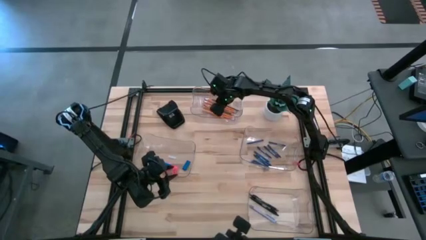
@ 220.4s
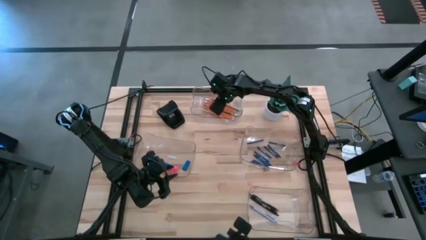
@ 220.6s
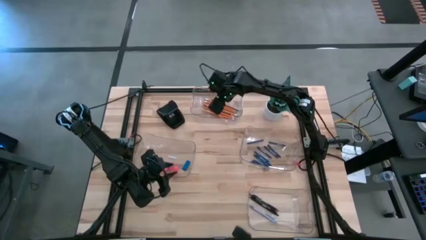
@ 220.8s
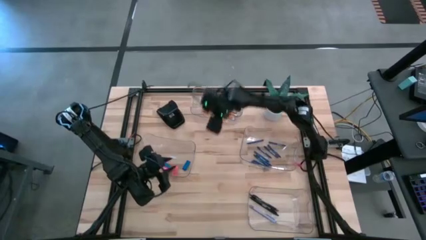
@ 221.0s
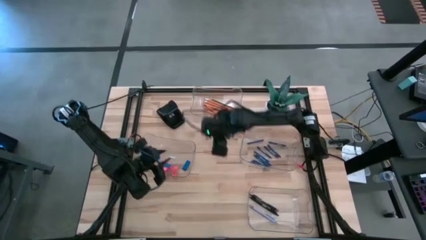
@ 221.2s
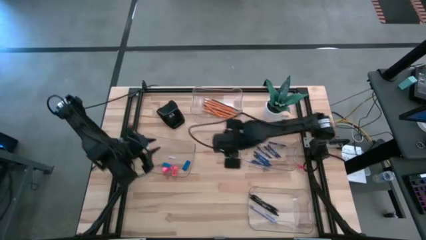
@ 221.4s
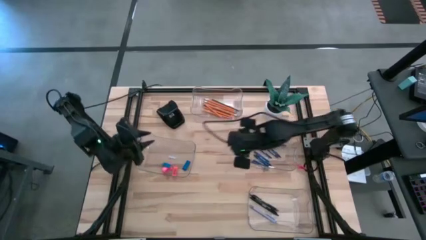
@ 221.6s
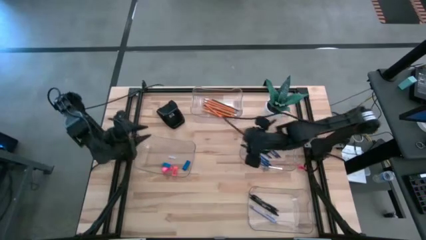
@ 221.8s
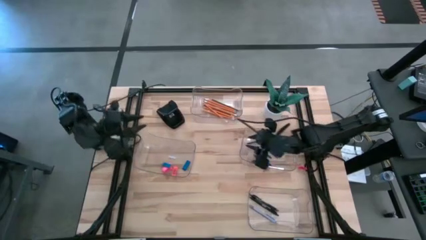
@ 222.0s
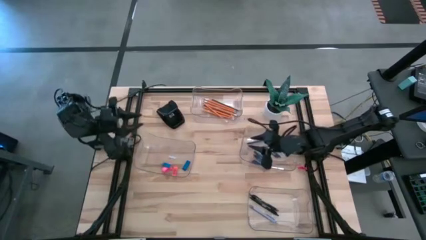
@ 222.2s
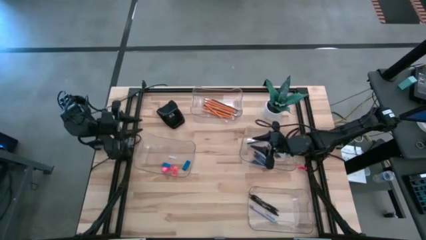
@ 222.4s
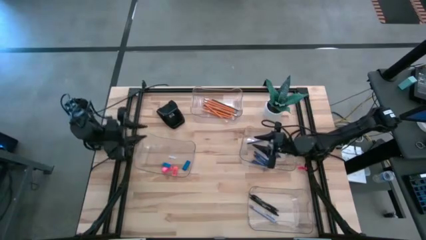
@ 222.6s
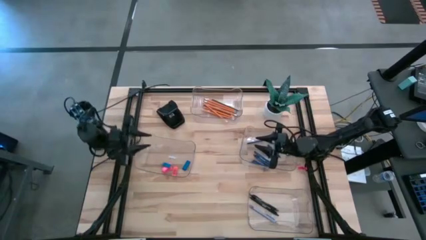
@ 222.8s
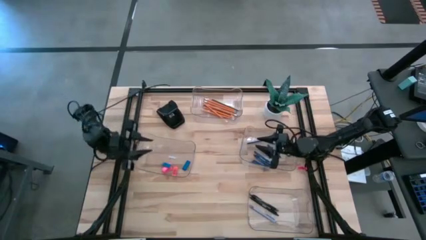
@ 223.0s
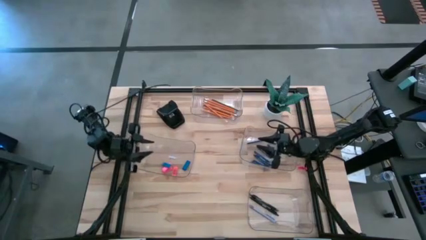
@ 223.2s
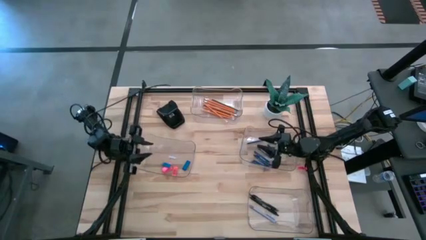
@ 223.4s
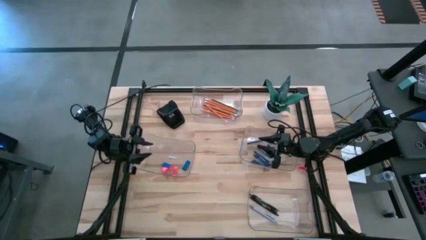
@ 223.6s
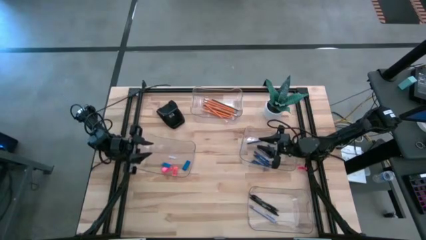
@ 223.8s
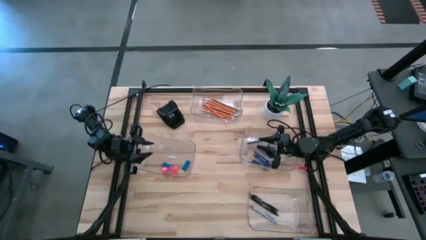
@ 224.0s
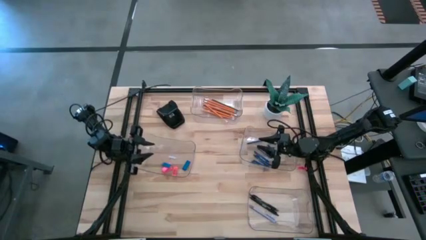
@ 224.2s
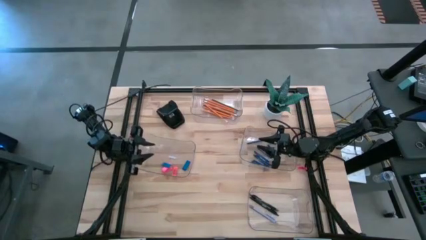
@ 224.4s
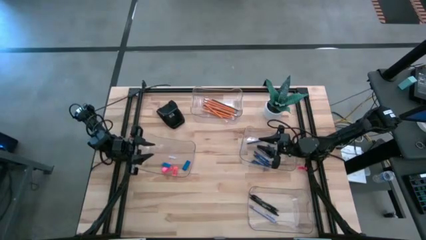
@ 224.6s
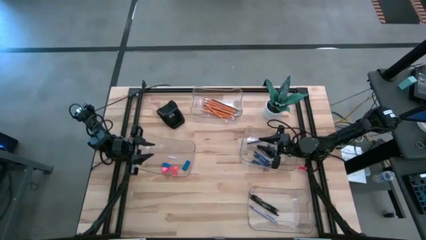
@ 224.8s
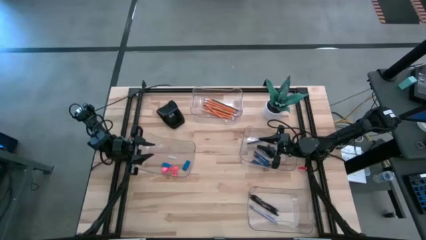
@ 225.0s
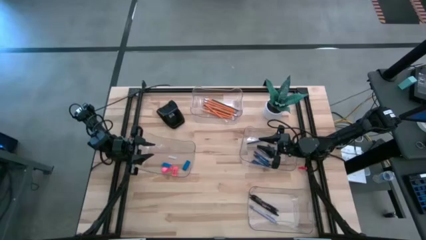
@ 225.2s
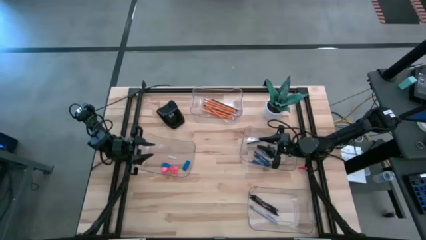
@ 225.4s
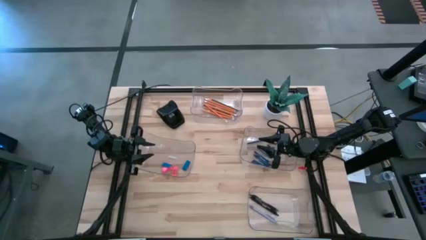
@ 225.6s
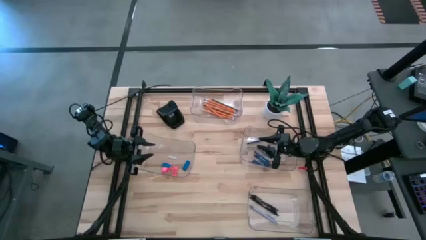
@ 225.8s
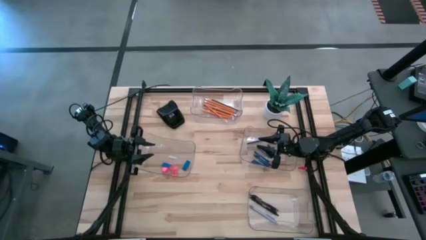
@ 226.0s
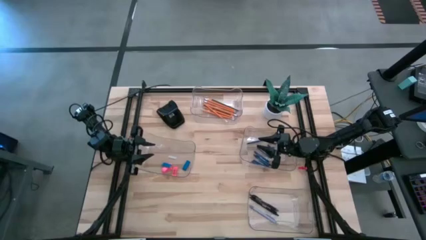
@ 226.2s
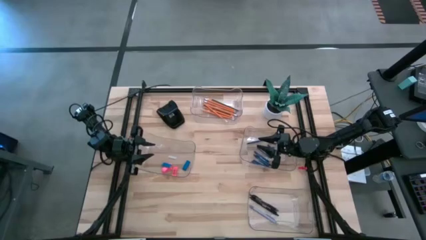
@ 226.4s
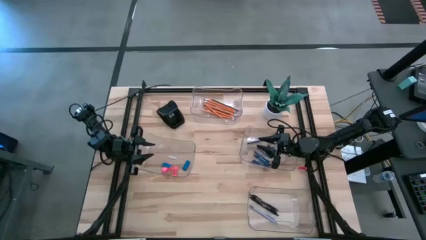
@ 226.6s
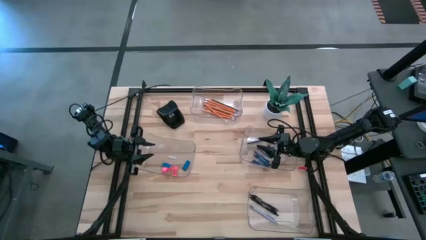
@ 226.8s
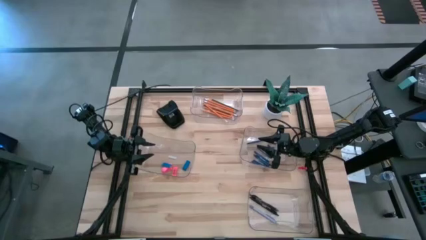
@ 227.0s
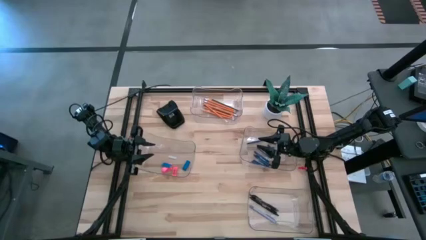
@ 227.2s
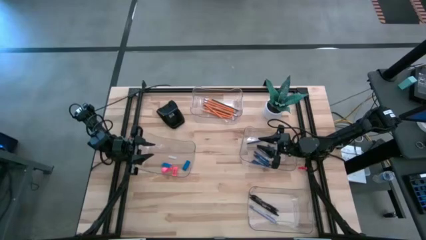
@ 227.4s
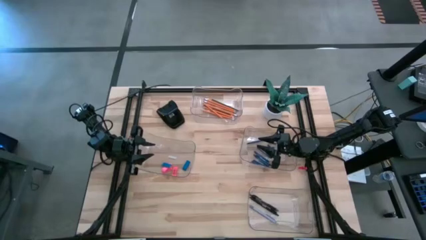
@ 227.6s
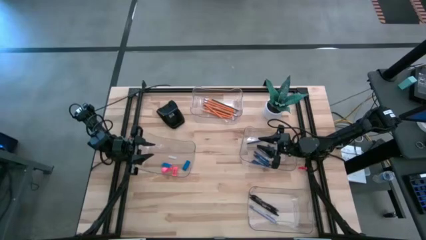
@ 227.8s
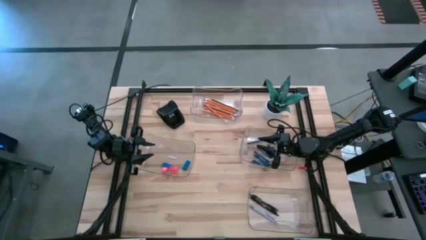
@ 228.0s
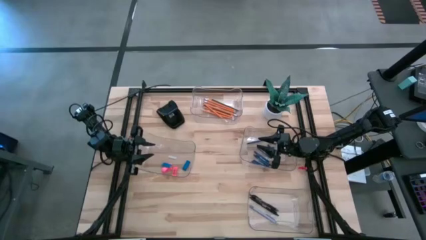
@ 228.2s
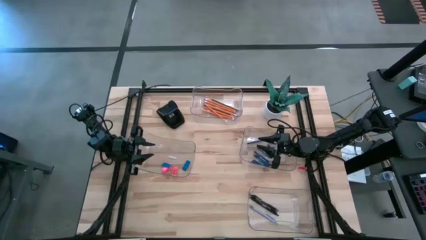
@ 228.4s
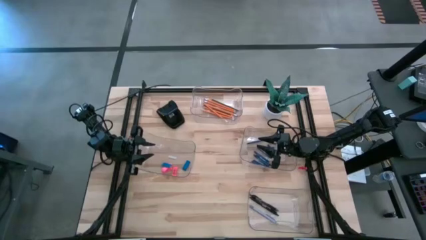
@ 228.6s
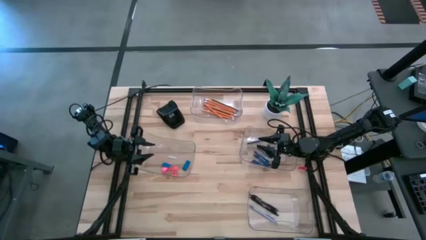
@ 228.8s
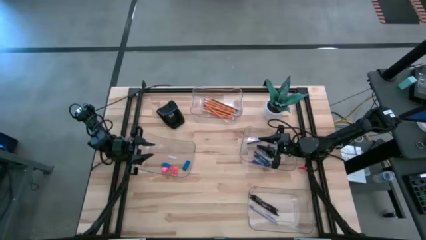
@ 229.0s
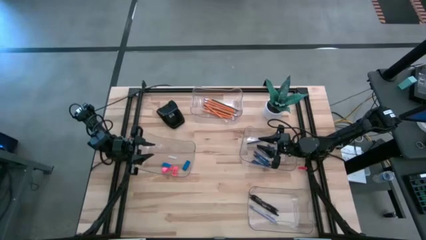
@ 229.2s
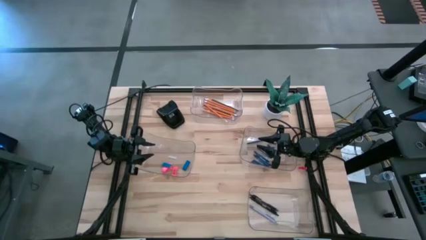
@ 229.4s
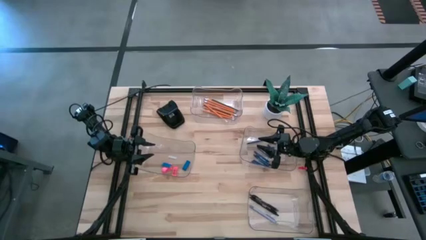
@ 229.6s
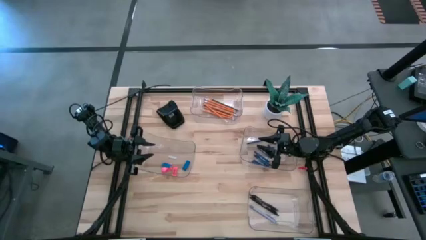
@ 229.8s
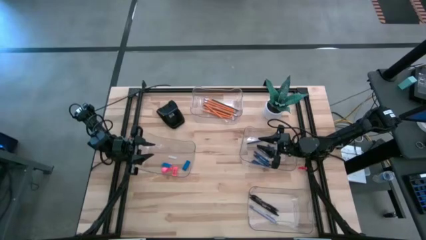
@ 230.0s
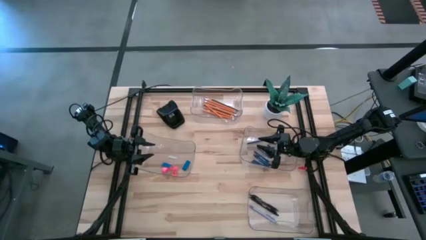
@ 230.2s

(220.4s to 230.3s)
Task: Sort crayons/erasers/pens/pencils in bins
Return to Home Position

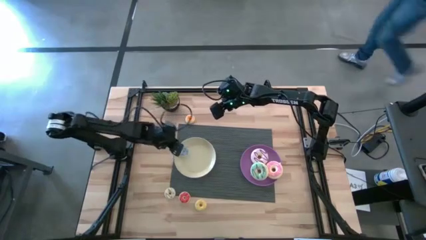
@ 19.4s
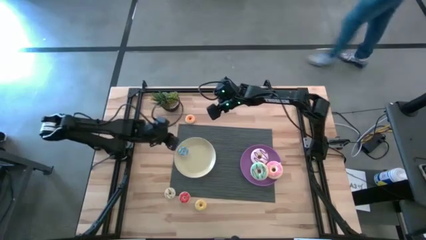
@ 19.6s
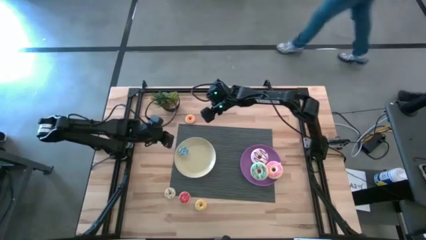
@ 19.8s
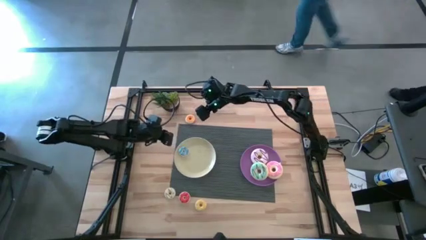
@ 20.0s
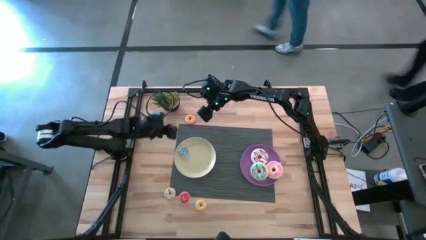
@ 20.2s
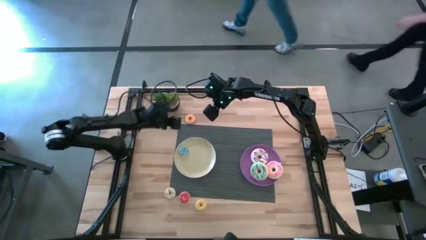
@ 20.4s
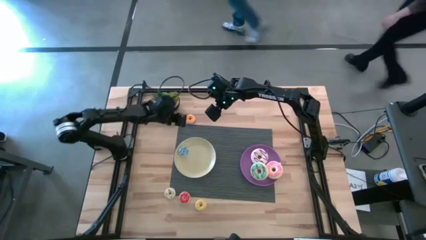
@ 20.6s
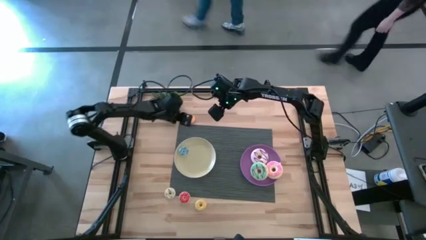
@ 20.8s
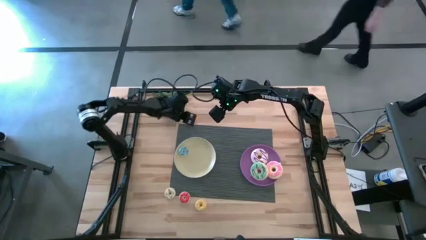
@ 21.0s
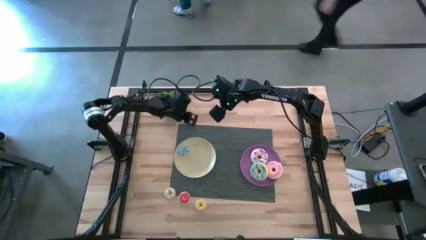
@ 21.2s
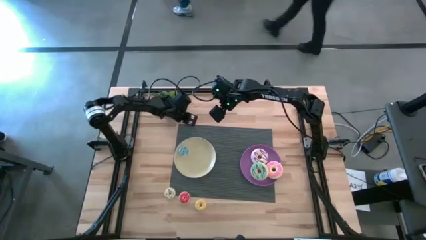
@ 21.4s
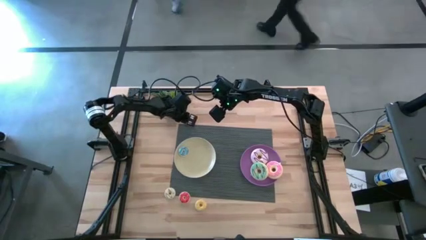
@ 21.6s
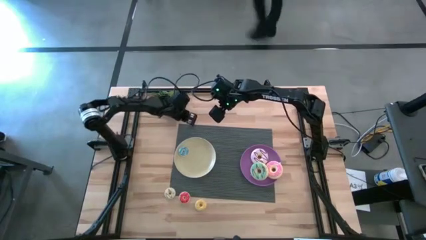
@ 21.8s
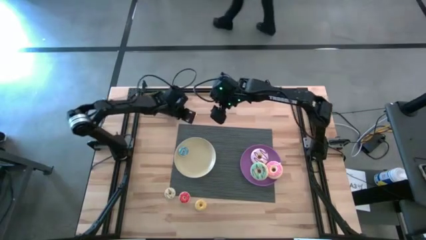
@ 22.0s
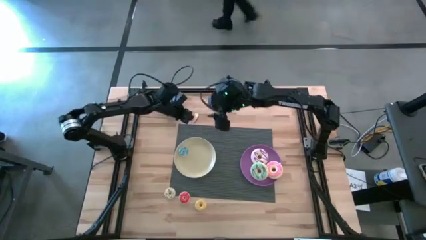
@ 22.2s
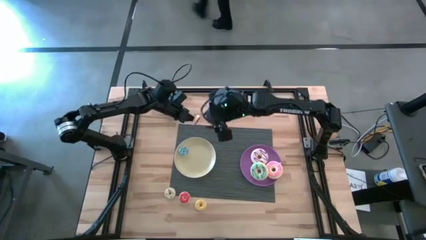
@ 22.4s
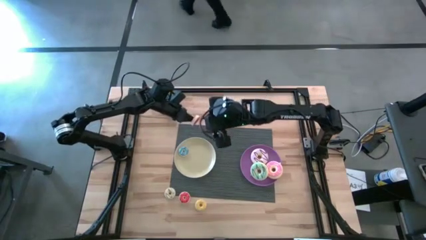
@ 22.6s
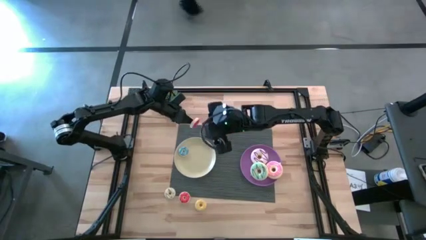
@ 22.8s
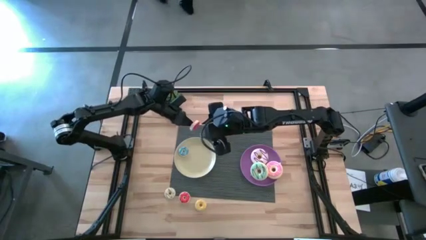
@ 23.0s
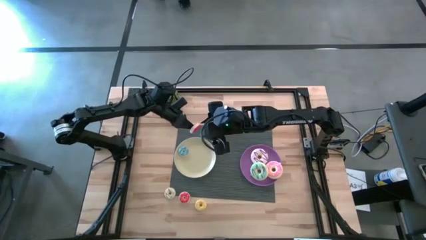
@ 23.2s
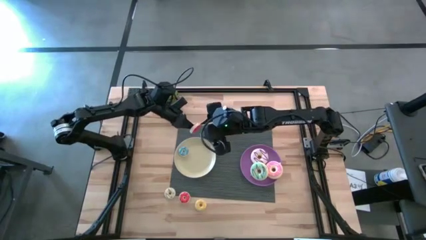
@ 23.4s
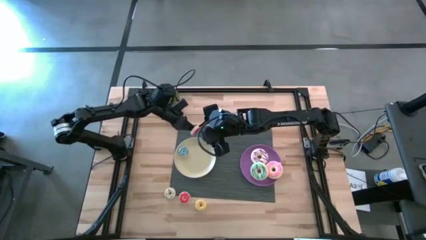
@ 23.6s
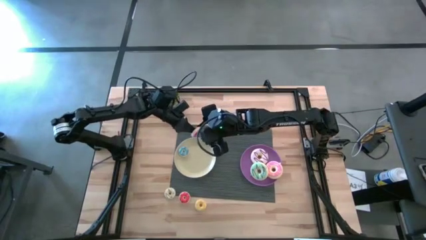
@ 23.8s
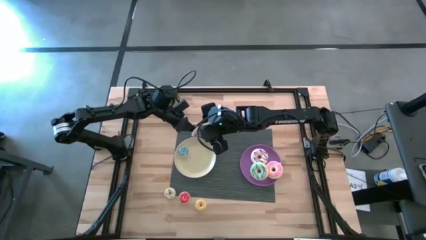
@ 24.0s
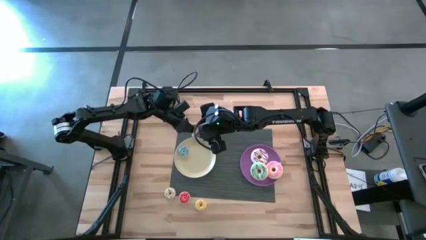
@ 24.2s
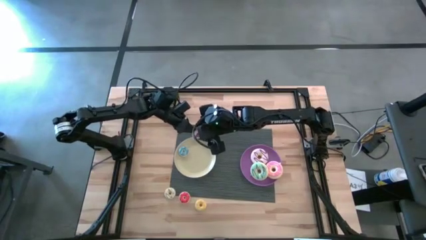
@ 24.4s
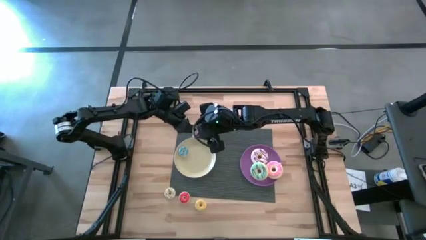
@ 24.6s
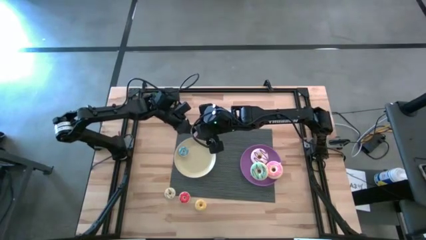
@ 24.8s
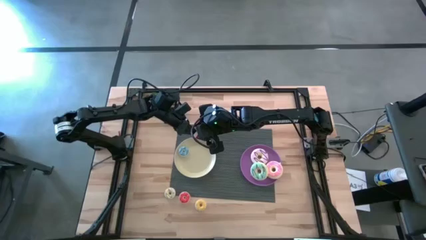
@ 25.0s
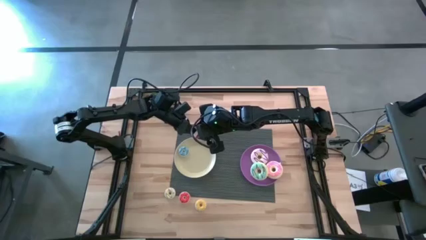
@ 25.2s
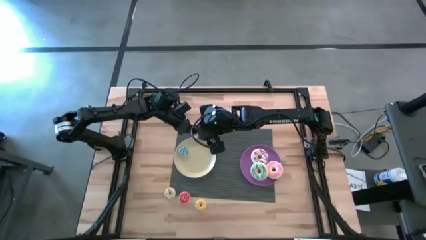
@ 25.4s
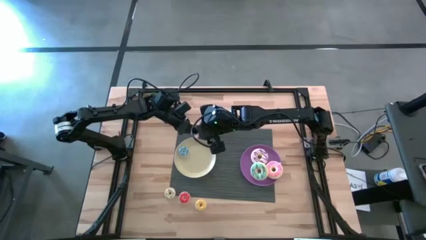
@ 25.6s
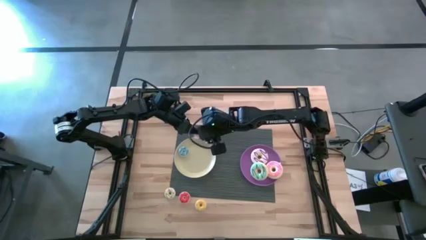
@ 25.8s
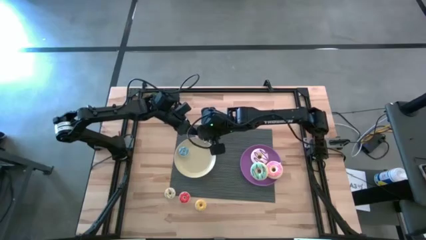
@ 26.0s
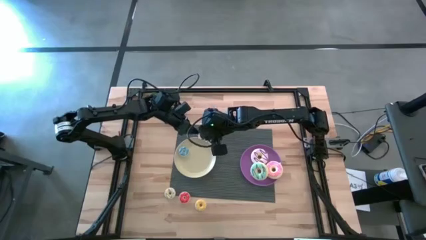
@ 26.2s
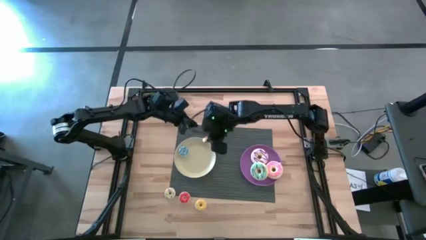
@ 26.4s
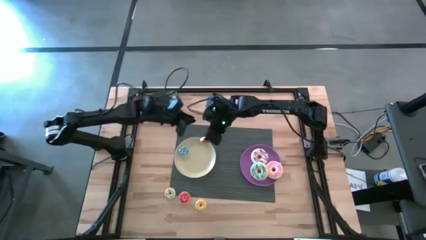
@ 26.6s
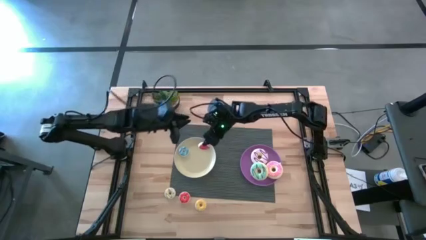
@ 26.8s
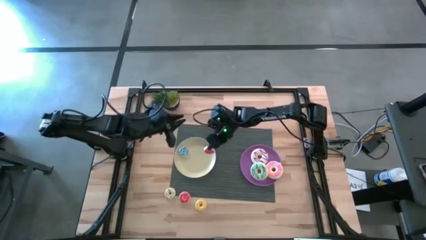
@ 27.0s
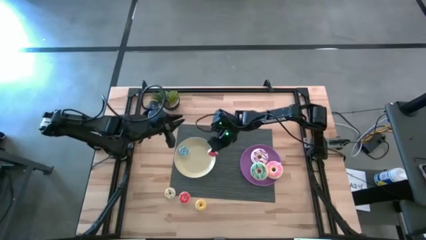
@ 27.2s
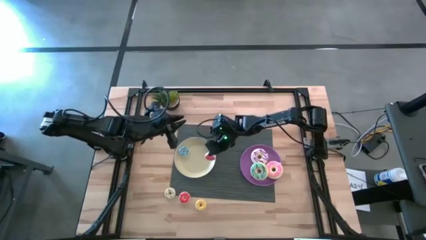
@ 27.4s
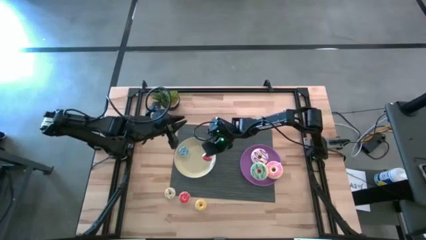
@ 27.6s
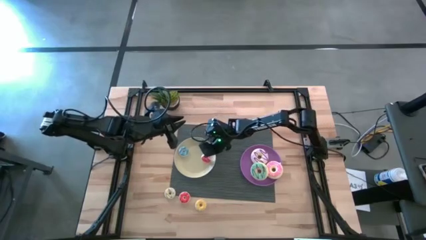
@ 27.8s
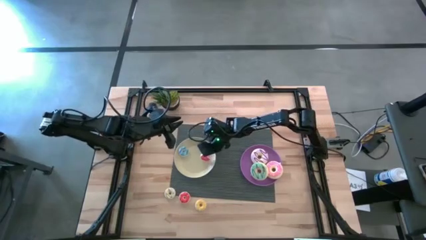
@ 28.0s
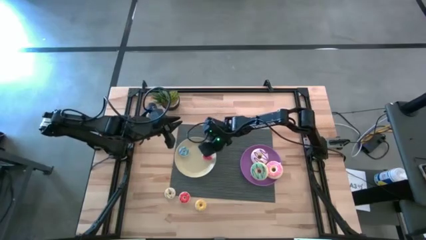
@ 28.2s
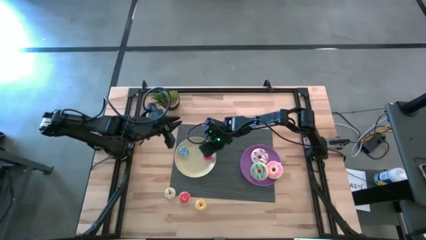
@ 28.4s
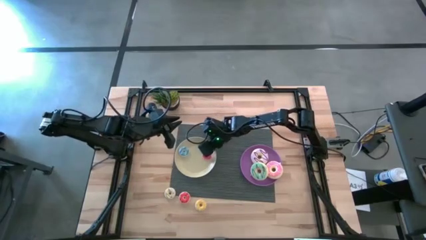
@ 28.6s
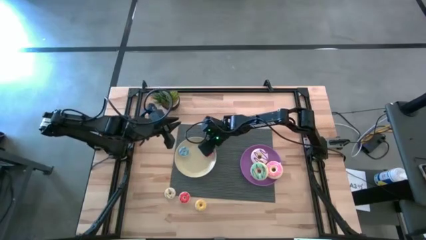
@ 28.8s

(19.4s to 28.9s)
Task: Pick & Place donuts
Put the small red donut on the white plate
